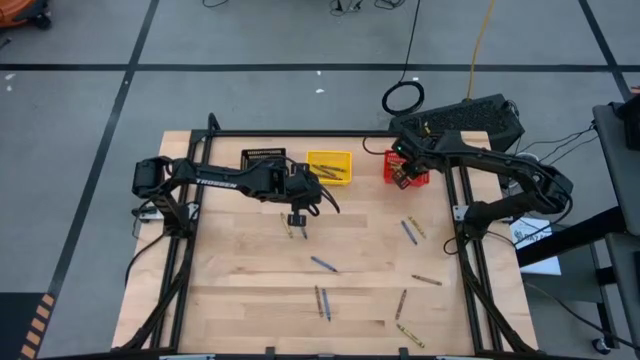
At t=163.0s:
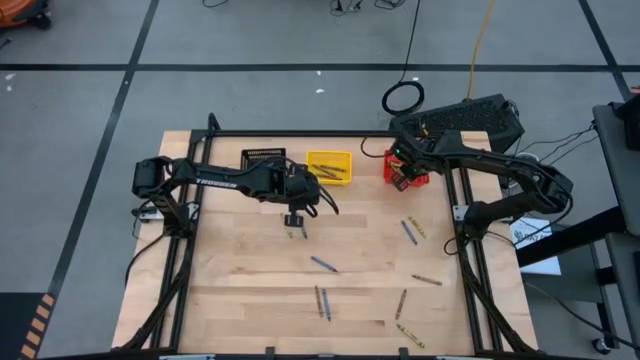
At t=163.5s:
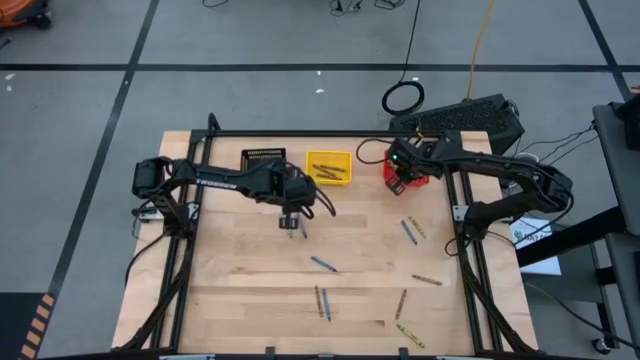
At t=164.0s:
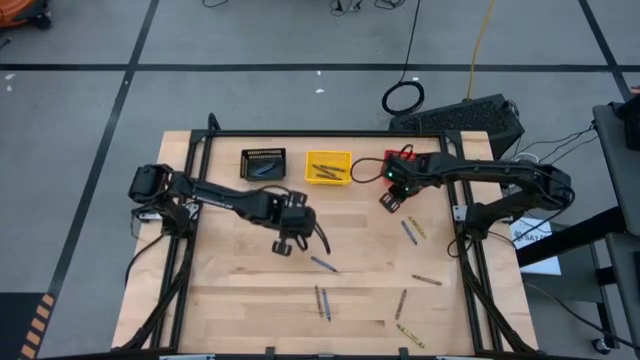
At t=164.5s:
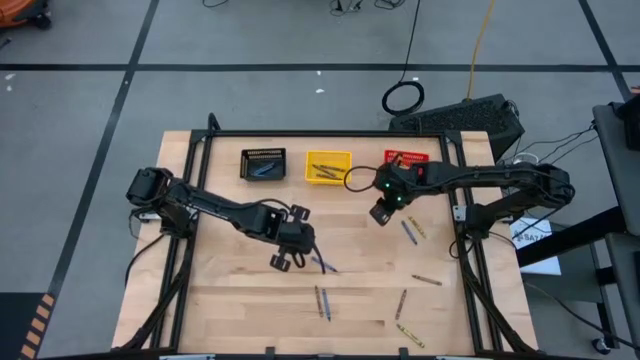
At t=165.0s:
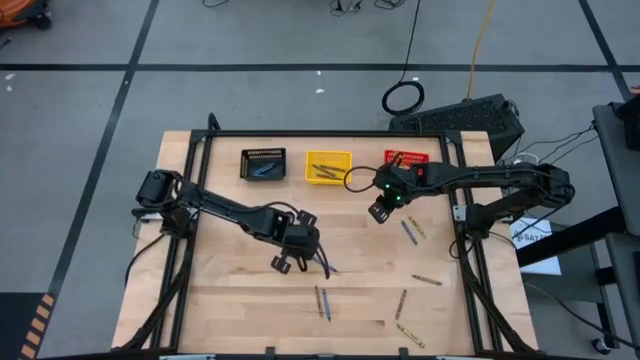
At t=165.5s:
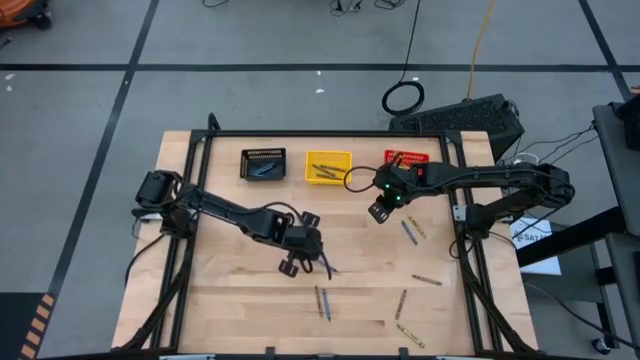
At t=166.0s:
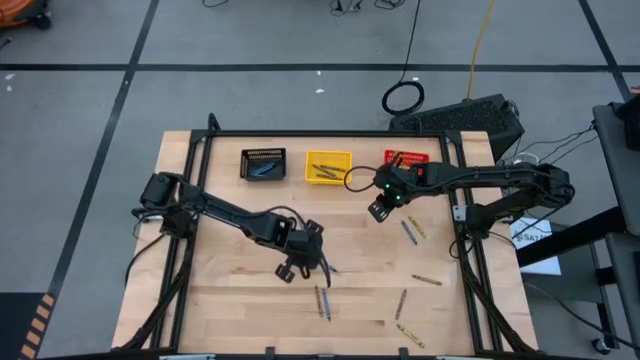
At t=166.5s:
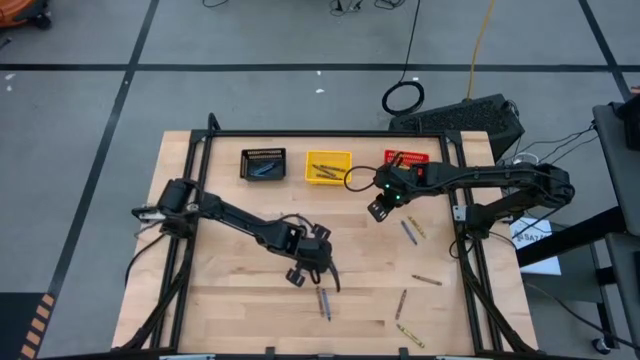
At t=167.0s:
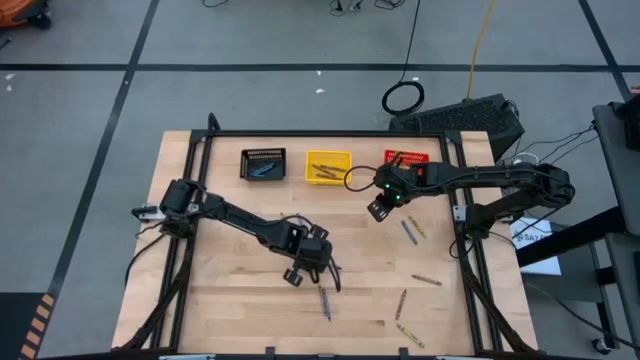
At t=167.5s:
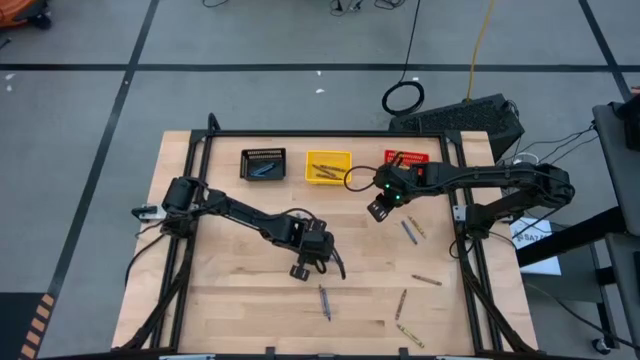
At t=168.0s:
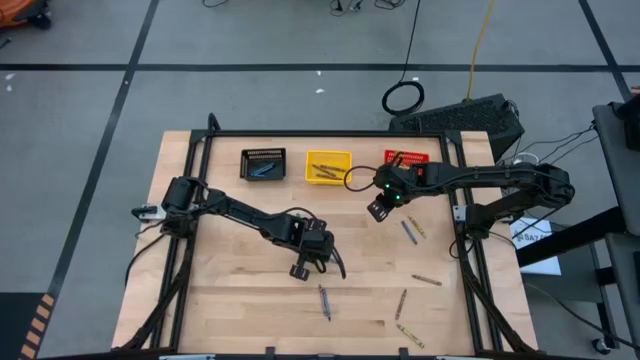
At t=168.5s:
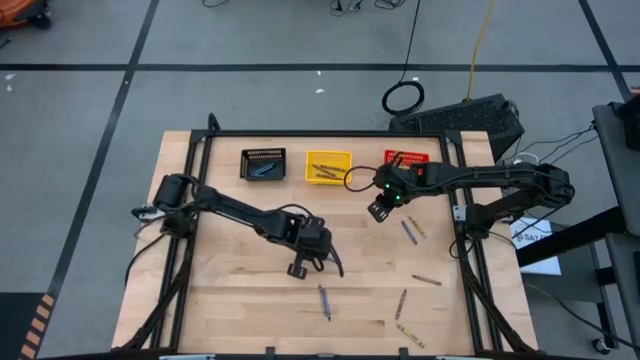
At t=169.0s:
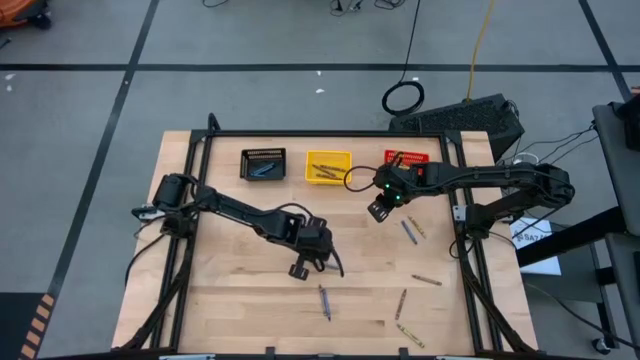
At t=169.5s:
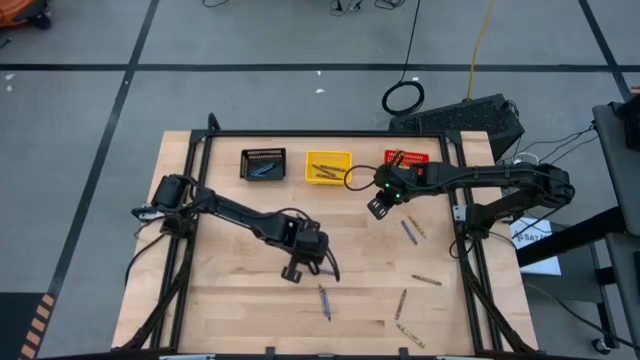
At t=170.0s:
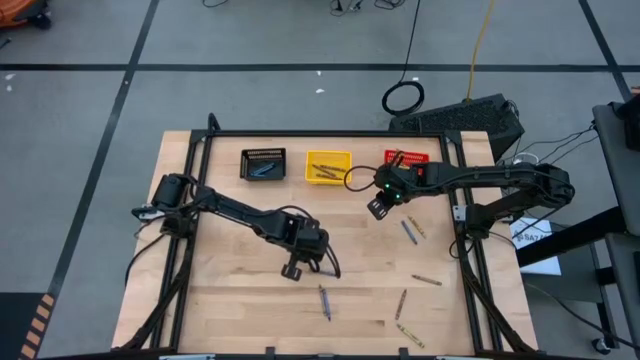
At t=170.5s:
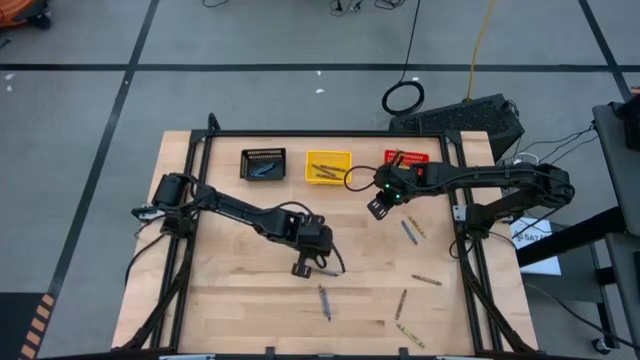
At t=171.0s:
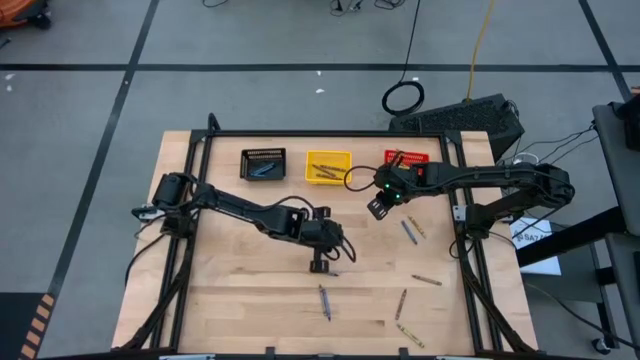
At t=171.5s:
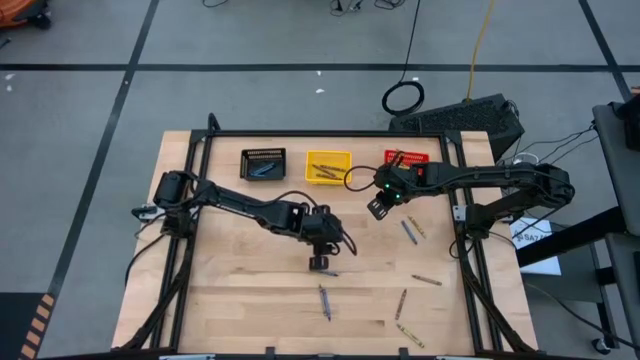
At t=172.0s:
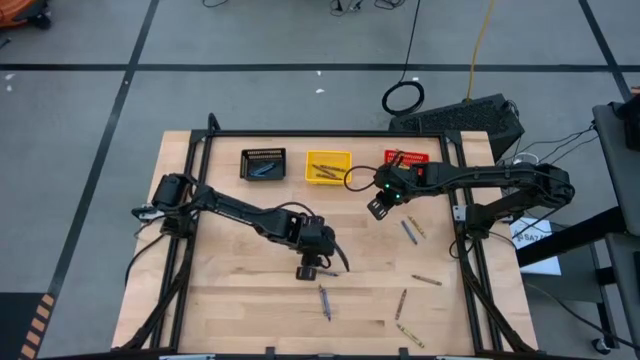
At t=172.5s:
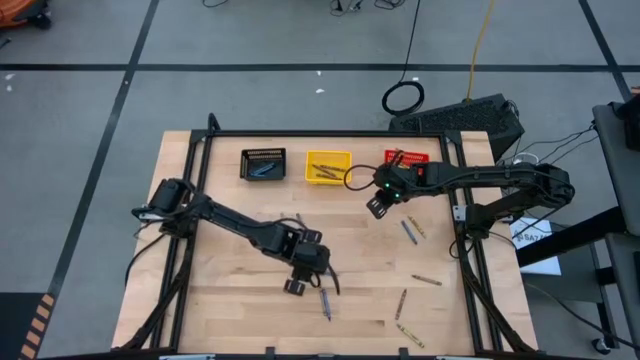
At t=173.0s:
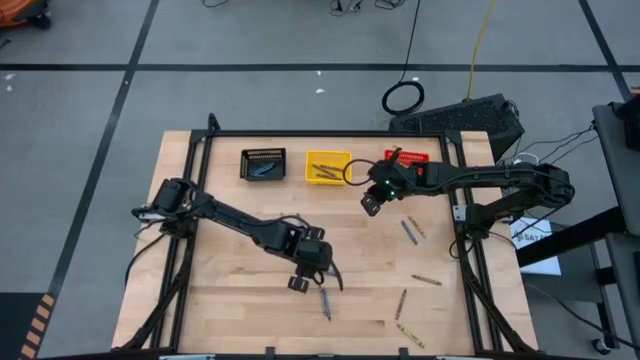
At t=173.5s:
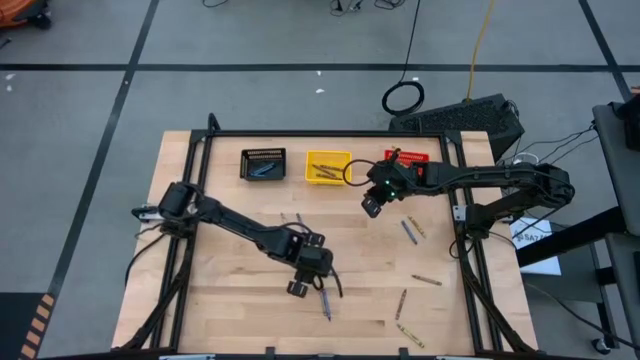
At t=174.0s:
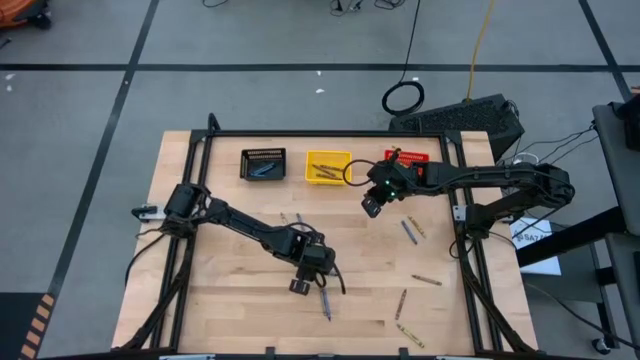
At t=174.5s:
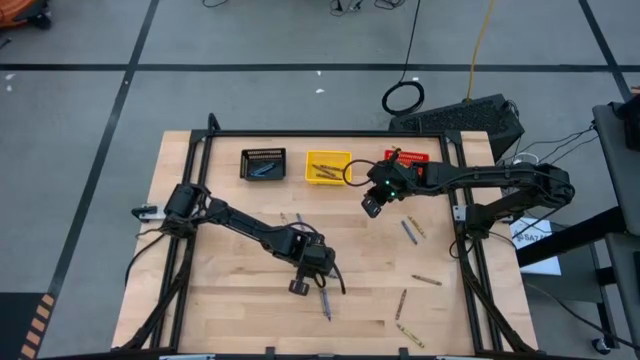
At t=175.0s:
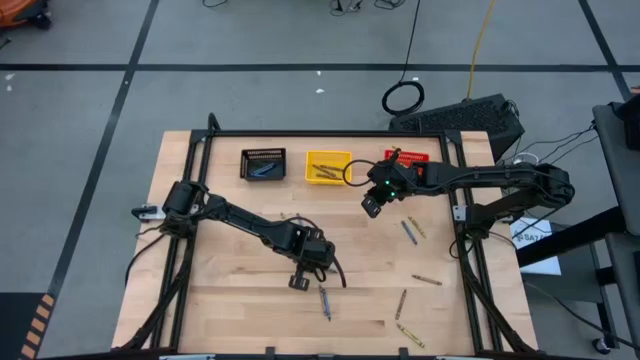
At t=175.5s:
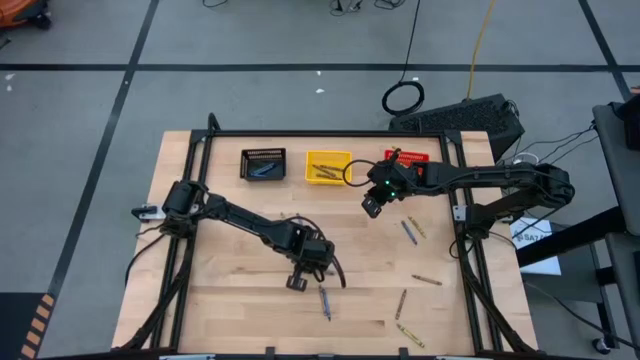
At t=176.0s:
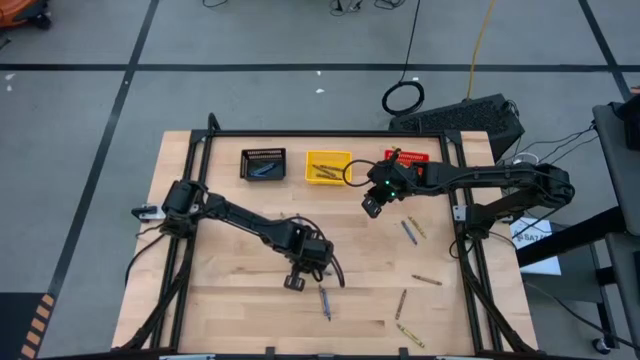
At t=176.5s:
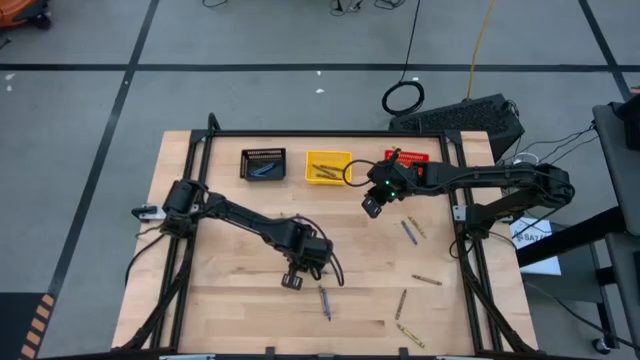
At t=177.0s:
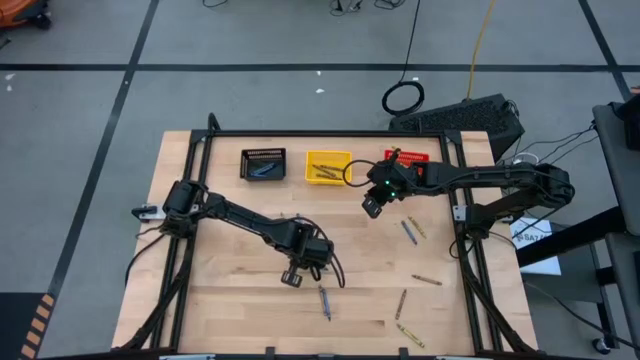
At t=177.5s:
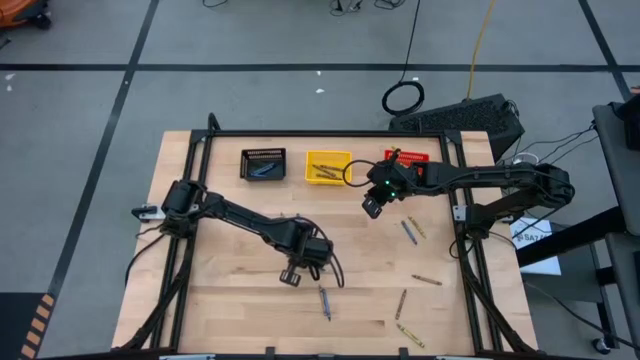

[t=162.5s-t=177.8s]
Task: Sort crayons
Put the crayon into the black bin

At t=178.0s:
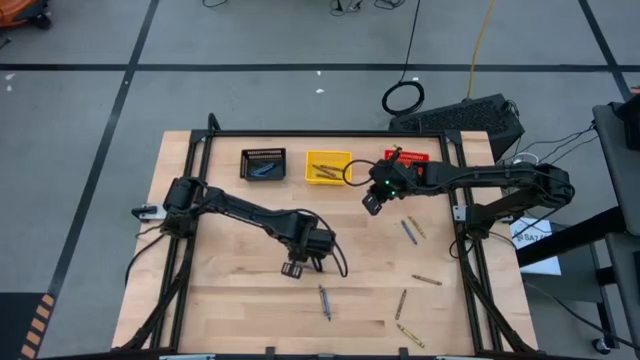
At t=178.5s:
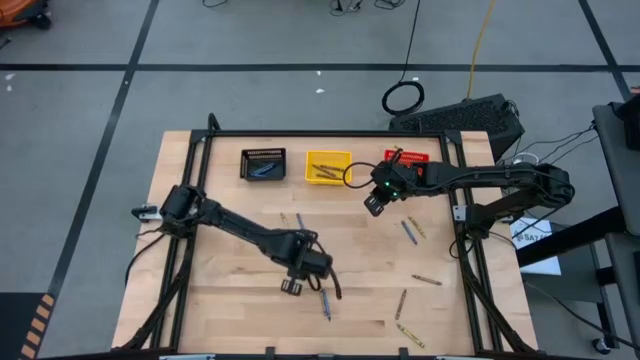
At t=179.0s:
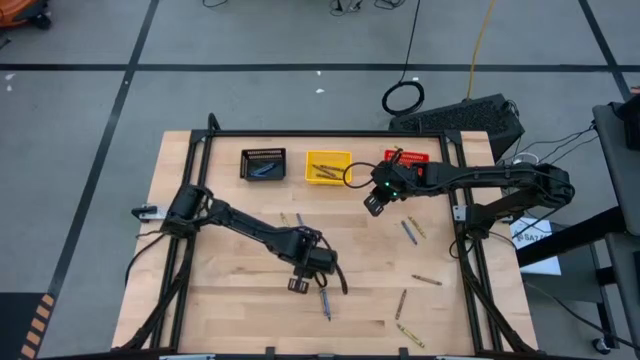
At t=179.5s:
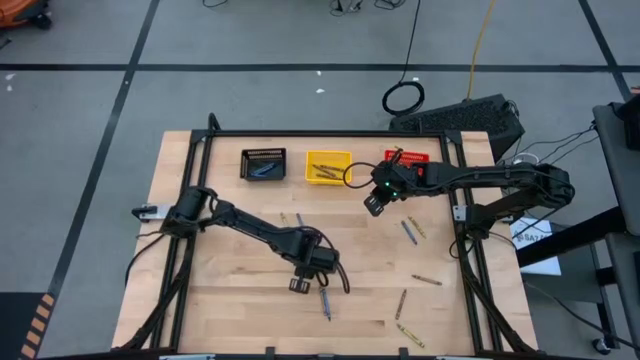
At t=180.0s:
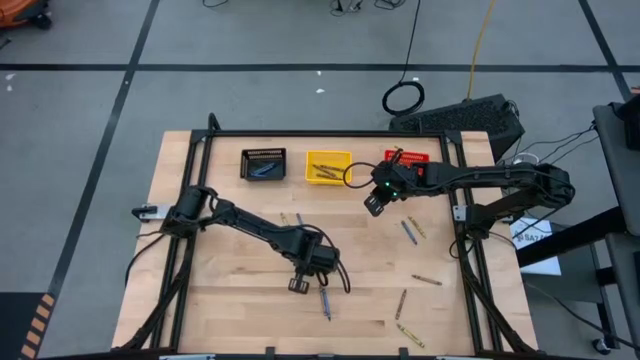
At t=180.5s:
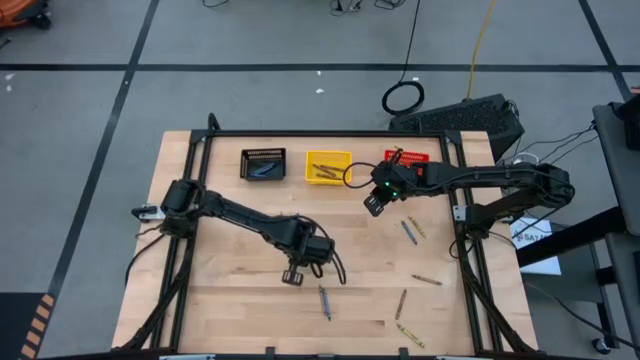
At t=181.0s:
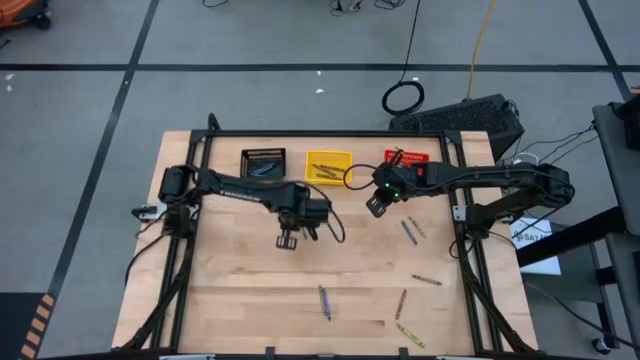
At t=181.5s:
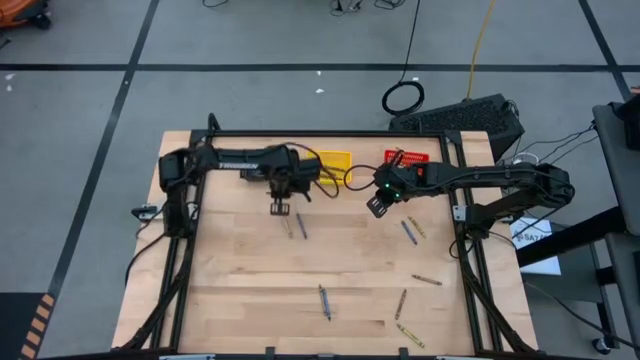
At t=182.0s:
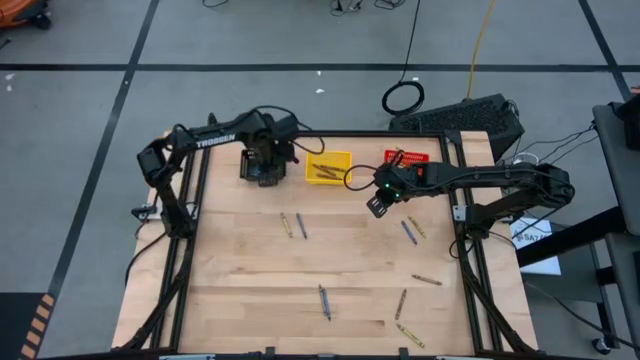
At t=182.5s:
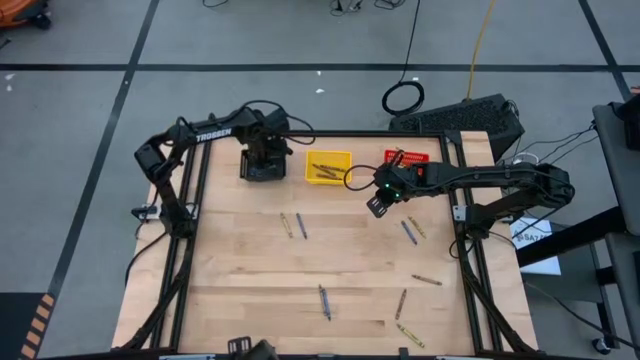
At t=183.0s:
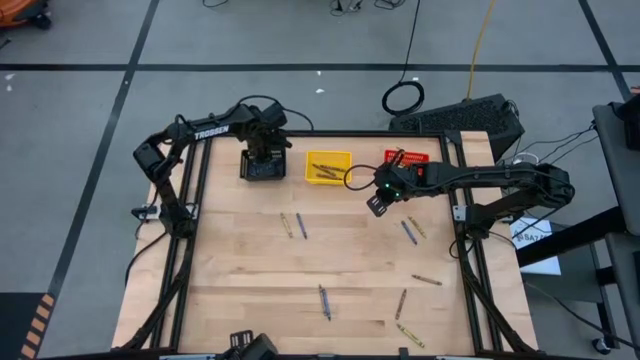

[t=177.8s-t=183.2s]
Put the blue crayon into the black bin

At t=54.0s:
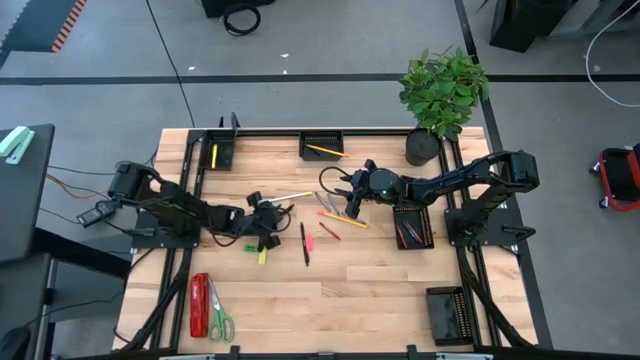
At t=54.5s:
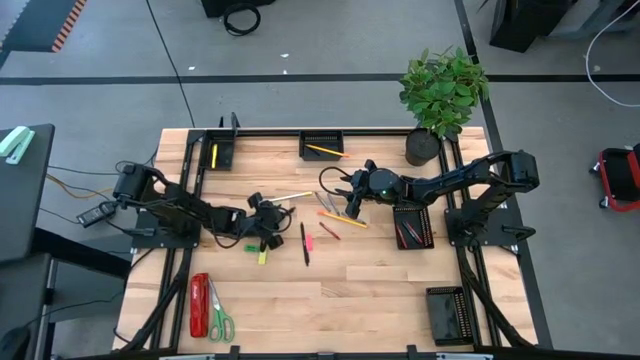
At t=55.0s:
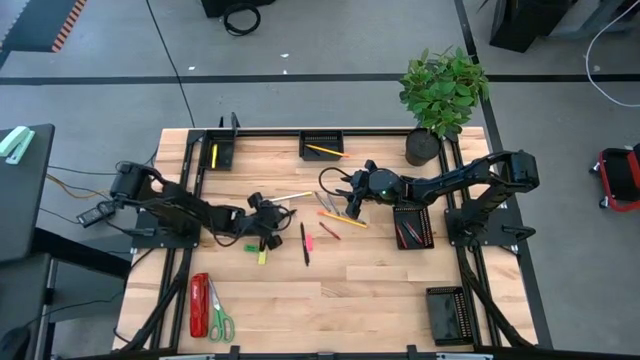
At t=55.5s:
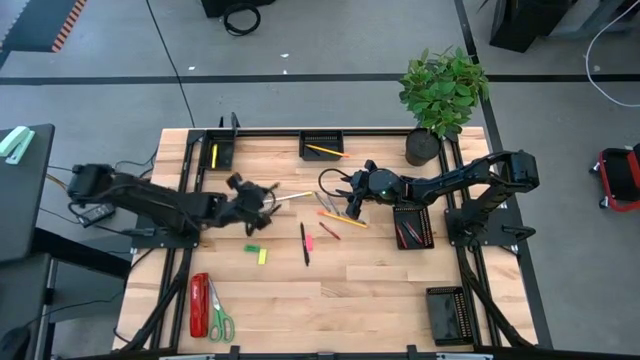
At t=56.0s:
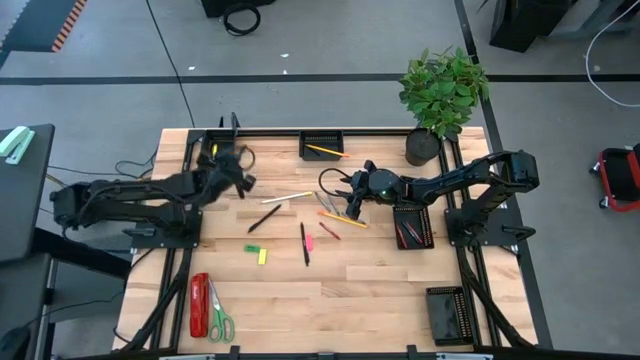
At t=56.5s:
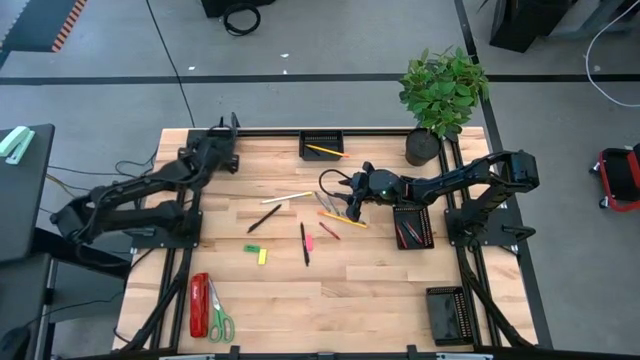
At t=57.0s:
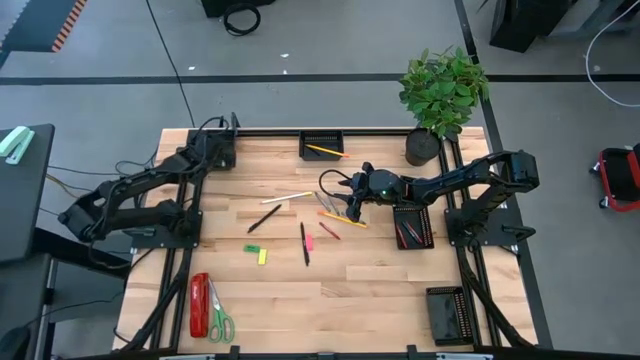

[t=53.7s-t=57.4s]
Task: Sort crayons/erasers/pens/pencils in bins
Put the black pen into the top left black bin
